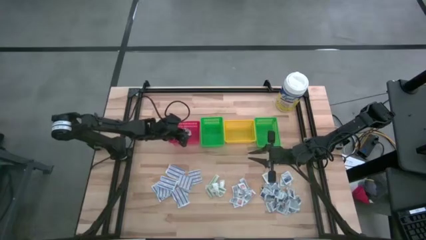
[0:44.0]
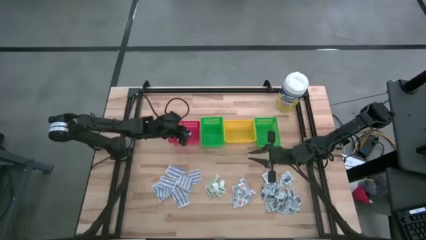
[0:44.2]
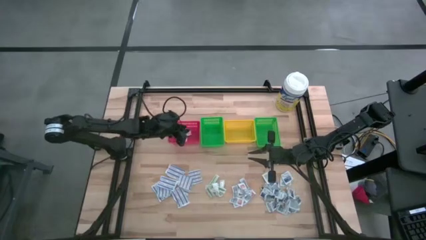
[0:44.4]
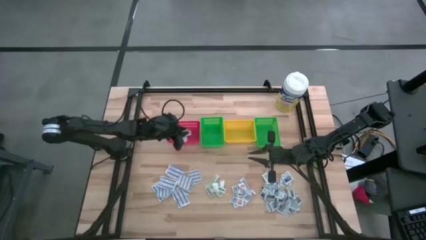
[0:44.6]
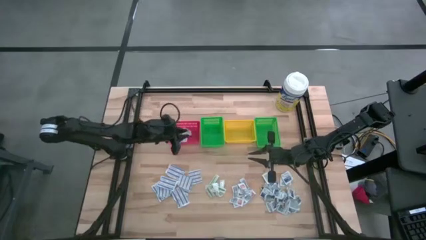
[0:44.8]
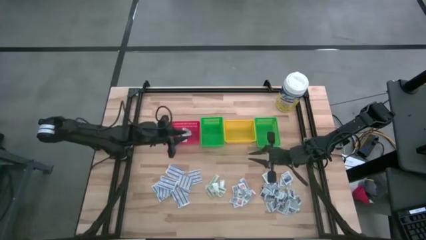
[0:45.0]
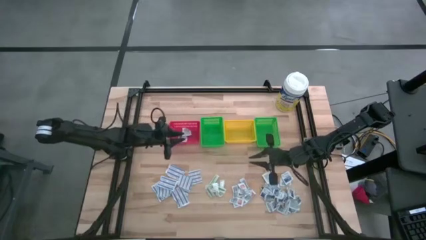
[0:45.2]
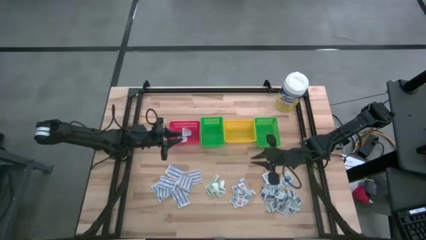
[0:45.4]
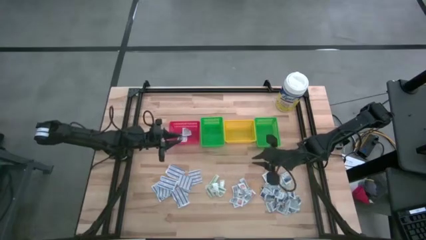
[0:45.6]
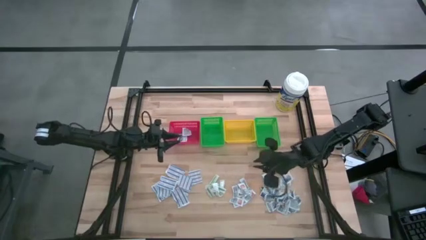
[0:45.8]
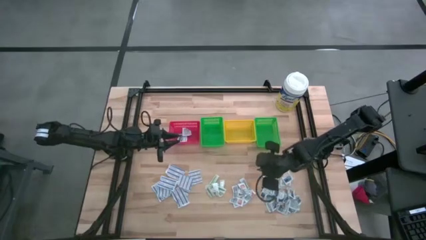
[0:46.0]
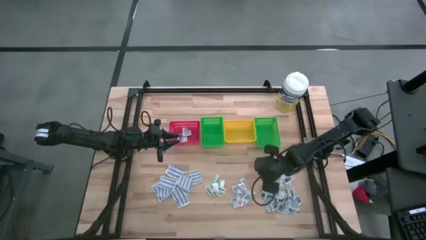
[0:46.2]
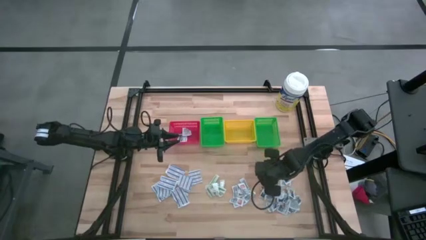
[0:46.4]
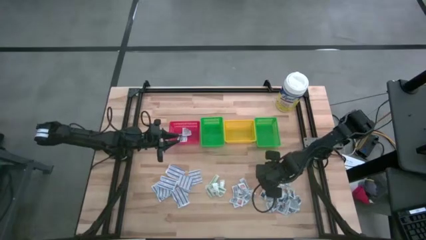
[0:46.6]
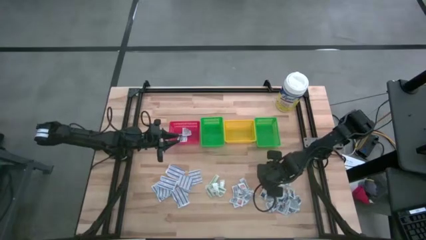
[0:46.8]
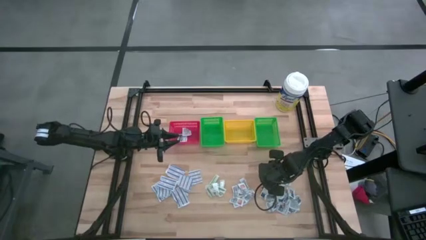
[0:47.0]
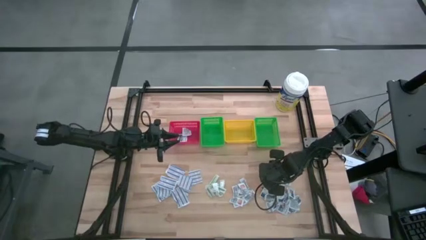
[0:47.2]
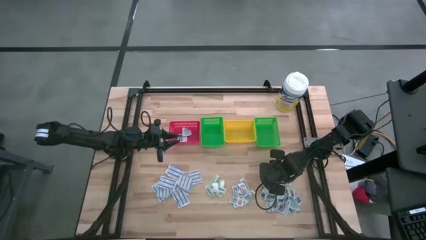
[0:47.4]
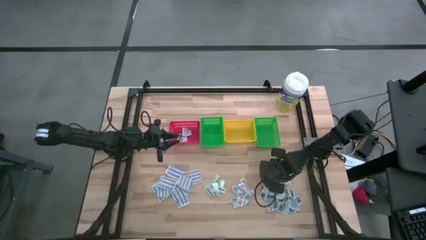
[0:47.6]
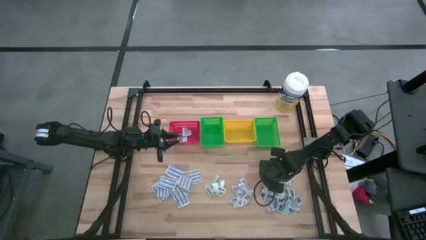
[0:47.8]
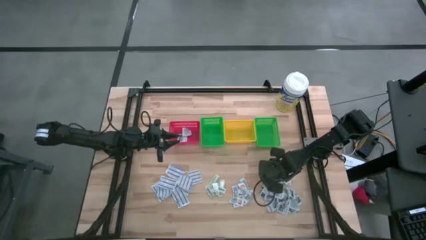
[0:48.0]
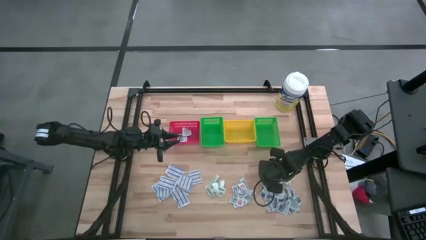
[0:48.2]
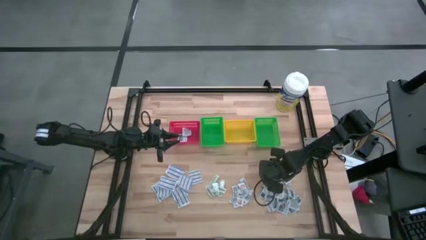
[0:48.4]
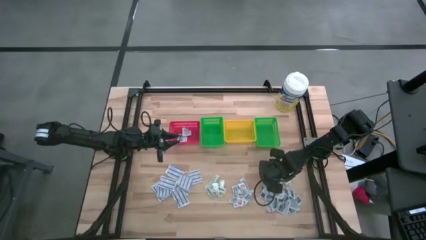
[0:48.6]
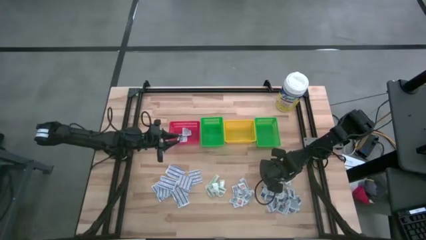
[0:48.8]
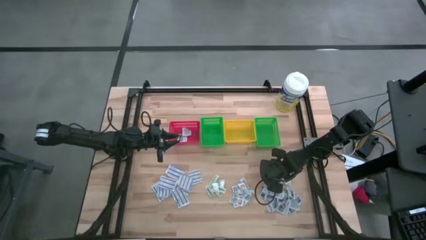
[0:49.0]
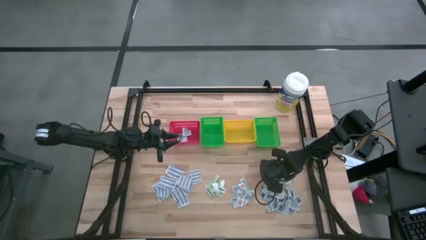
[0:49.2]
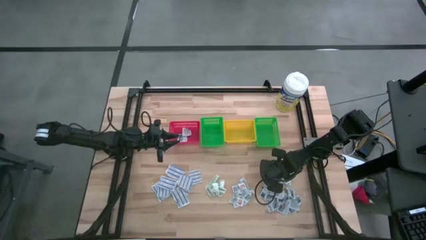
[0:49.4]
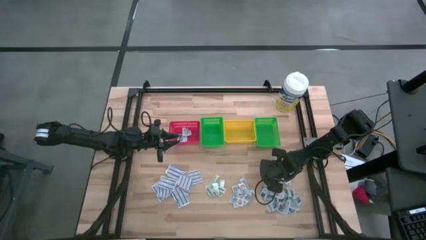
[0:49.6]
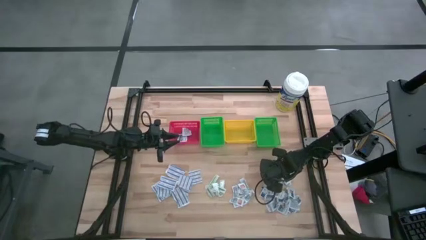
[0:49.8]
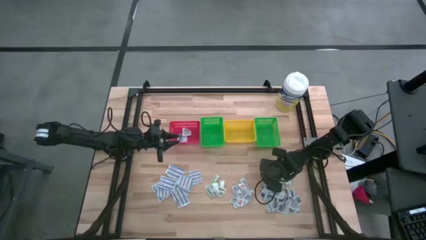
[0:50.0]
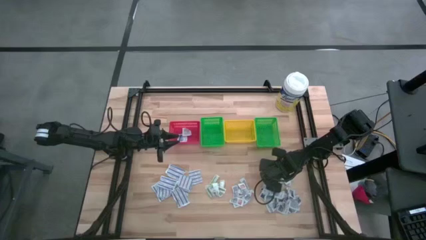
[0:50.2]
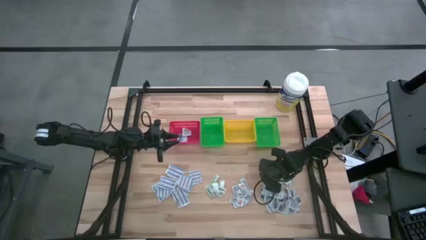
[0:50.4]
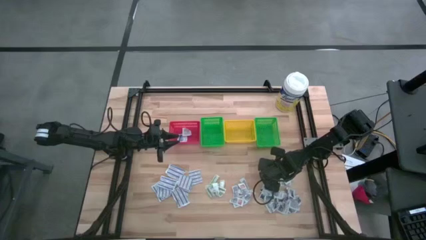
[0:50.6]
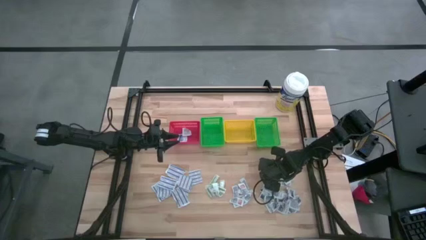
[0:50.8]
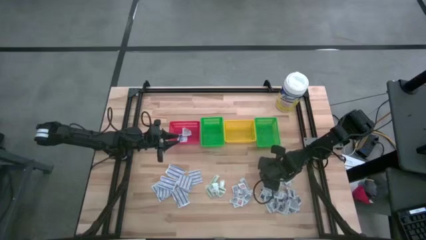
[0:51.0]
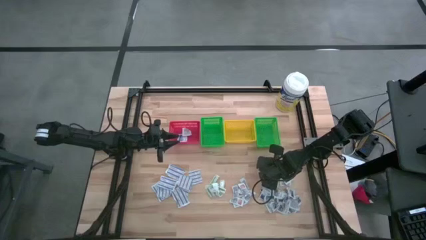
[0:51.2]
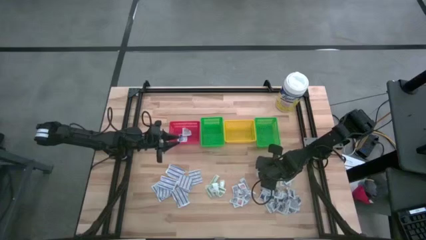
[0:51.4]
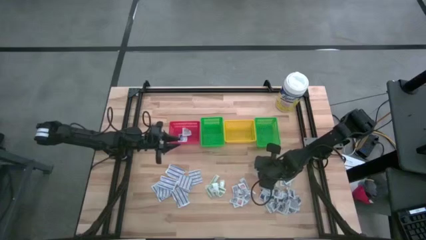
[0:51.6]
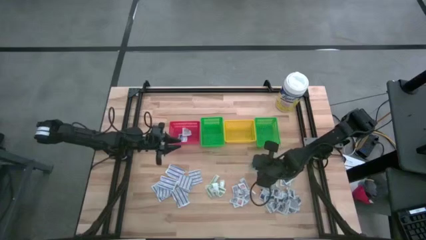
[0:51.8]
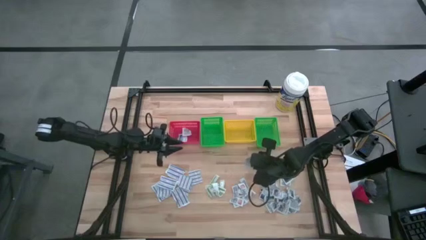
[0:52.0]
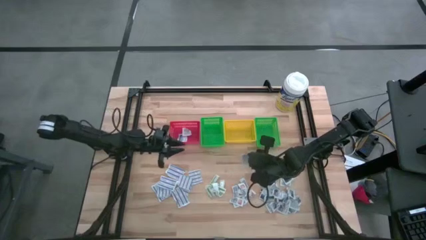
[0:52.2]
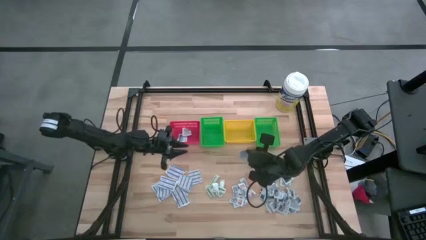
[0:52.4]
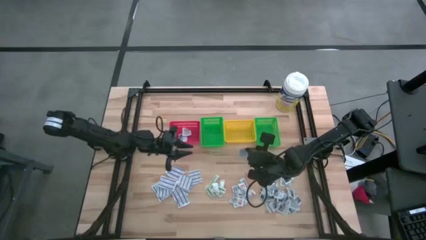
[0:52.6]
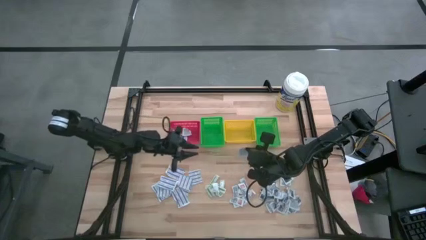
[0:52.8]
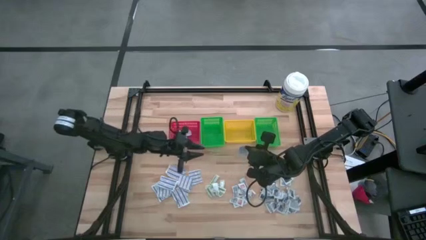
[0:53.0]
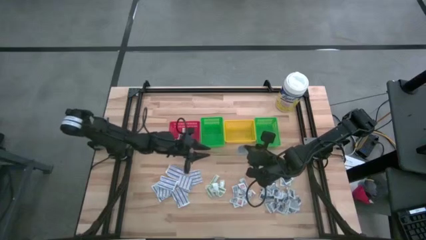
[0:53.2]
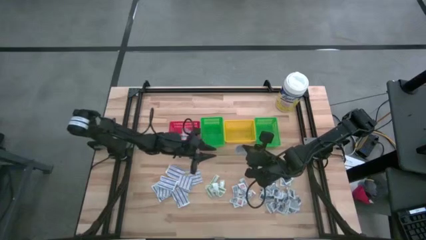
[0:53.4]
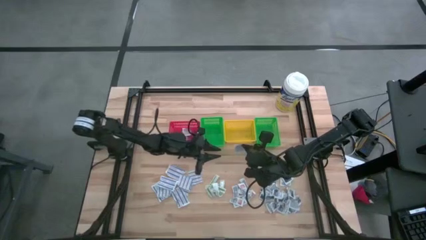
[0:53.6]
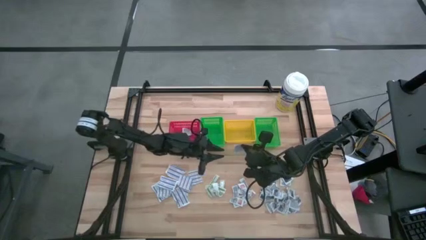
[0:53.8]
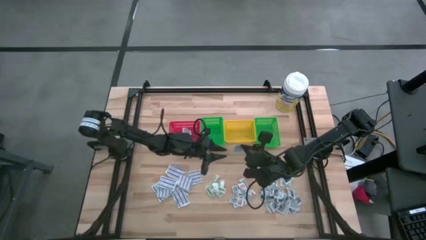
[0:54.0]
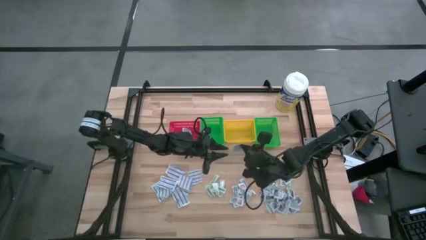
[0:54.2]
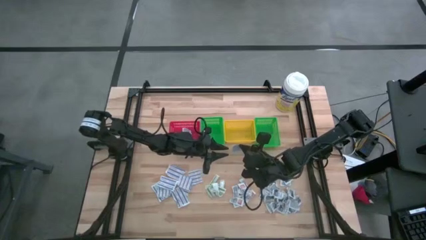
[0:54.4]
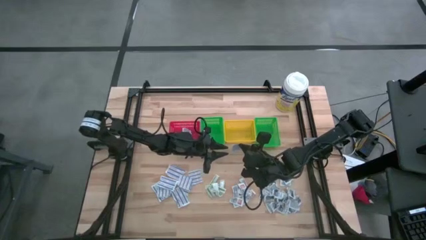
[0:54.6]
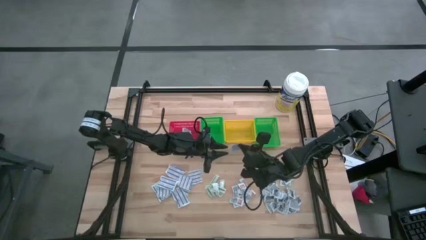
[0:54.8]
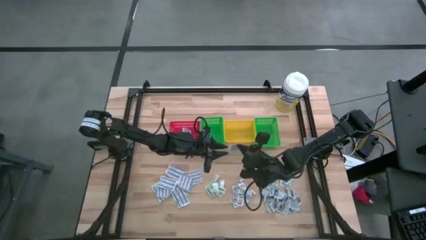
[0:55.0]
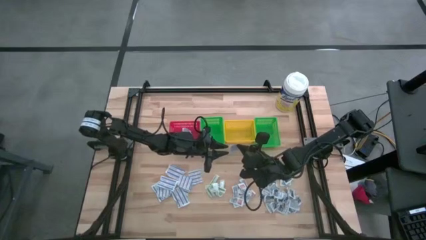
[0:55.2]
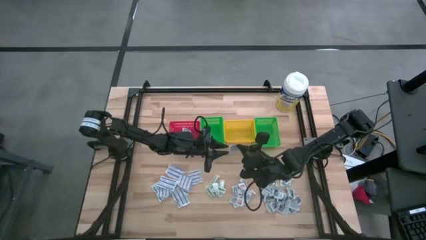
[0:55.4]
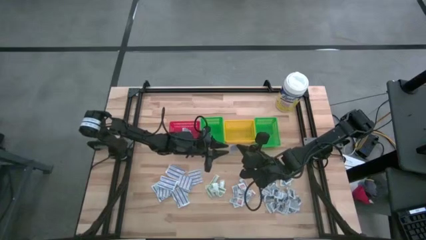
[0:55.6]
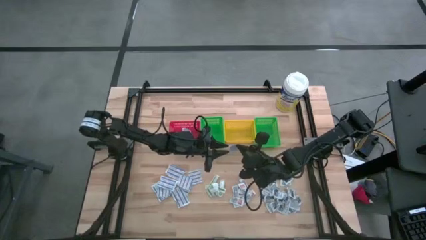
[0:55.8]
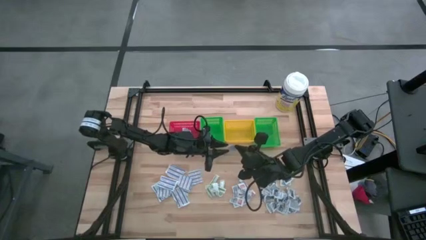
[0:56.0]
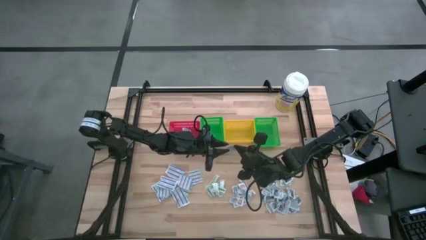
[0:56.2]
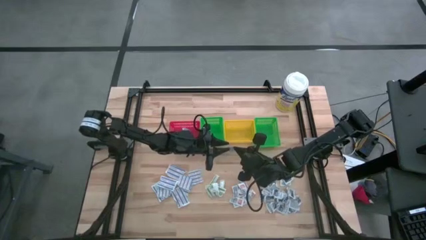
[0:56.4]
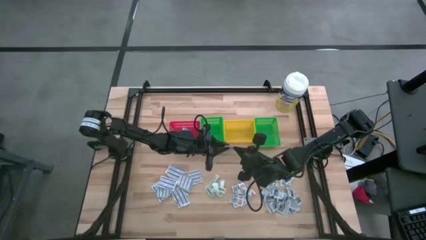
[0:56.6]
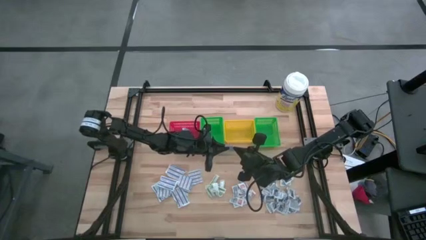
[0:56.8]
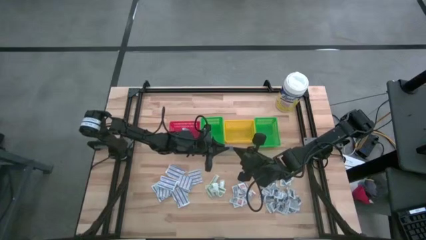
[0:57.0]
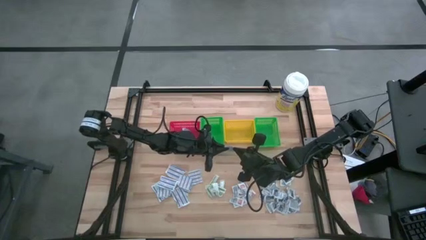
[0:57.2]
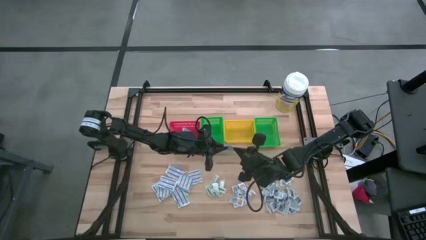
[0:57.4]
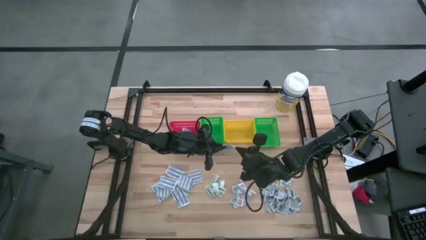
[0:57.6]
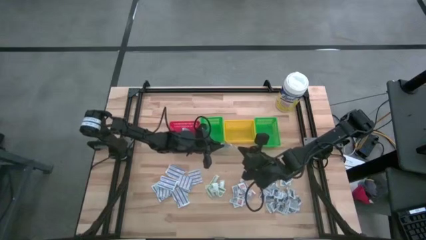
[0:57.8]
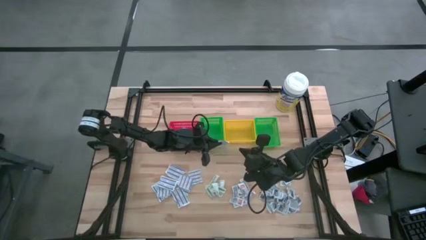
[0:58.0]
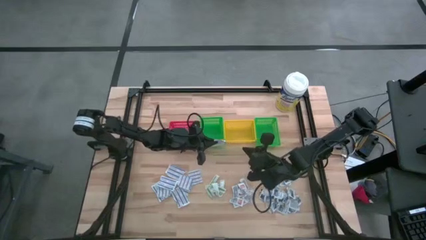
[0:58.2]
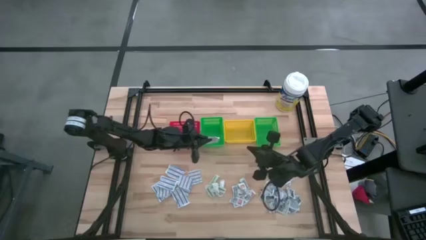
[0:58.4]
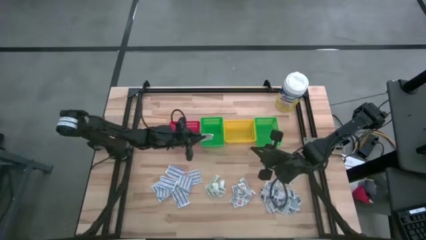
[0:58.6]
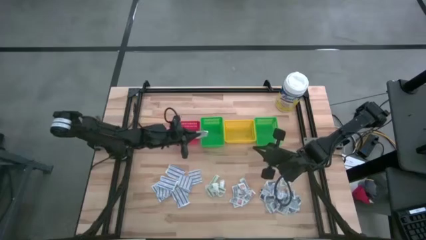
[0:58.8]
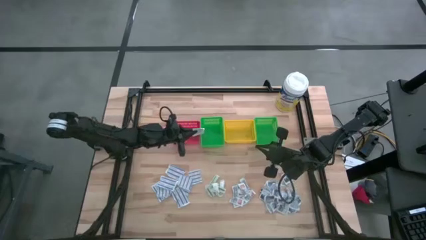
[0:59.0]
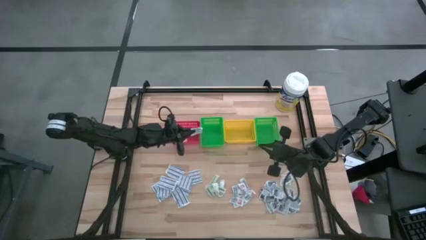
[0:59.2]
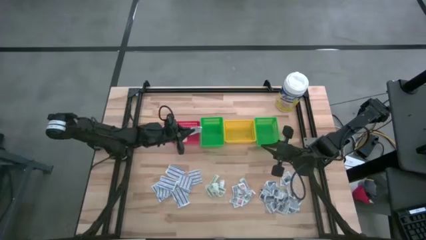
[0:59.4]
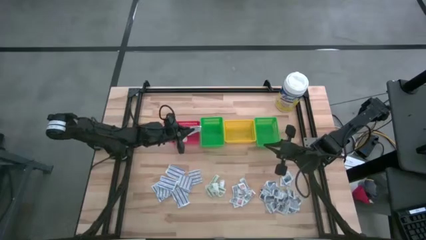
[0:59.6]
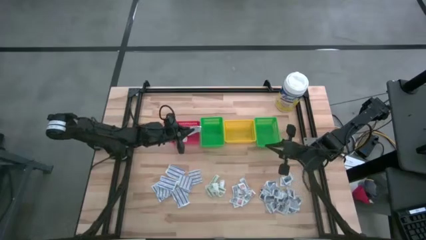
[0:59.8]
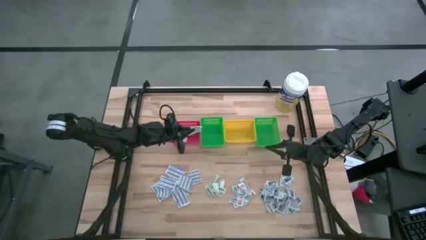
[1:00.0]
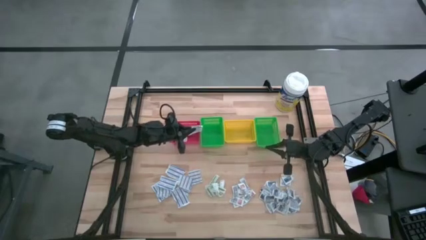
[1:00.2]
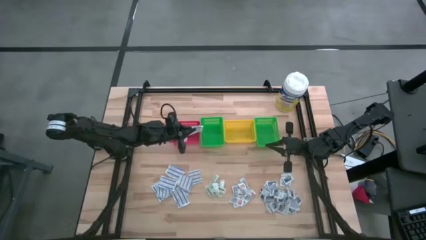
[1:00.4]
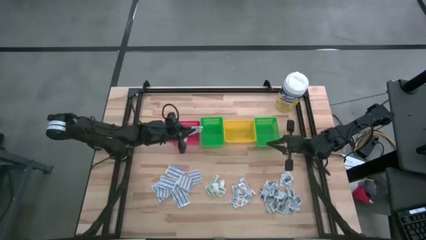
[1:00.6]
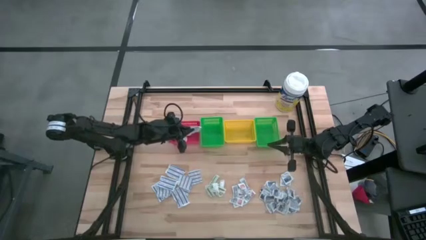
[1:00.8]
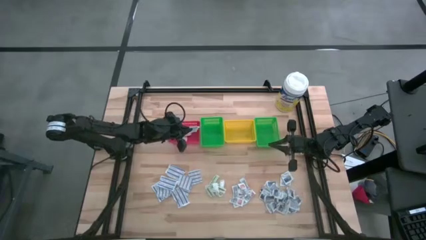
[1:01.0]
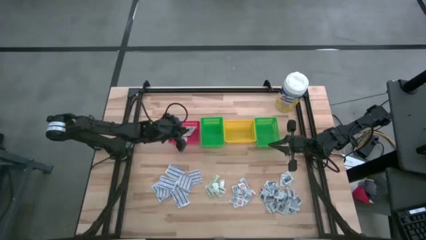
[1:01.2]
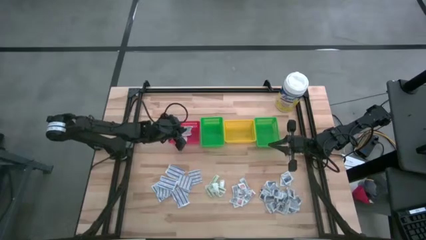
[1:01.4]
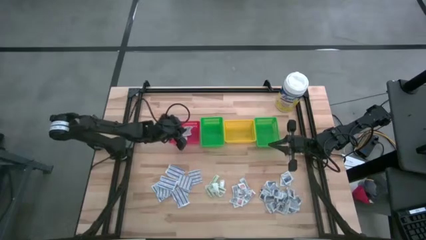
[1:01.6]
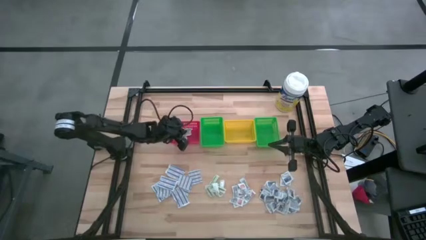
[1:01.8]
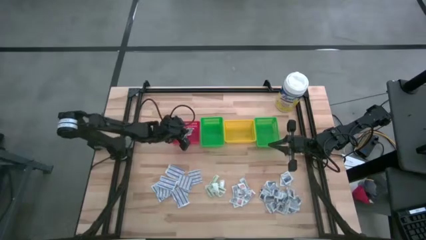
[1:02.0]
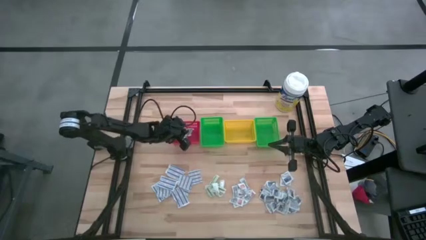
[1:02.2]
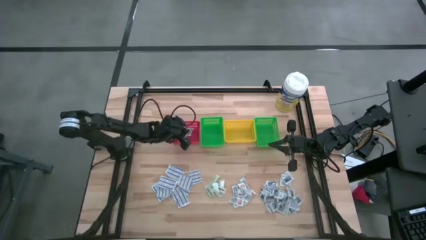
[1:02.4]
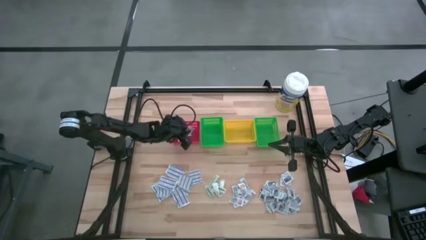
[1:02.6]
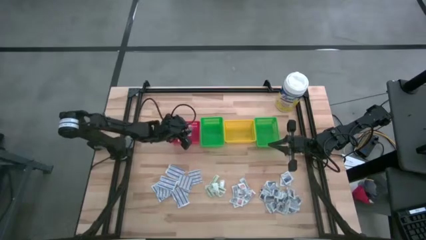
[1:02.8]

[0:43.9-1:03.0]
Task: Pick & Place First Aid Supplies
Put the alcohol pad into the red basket
